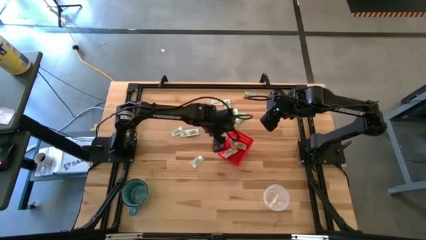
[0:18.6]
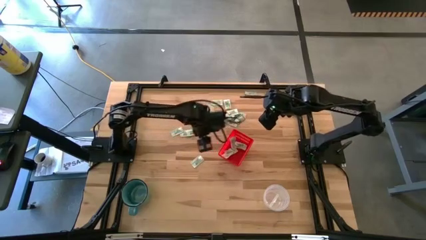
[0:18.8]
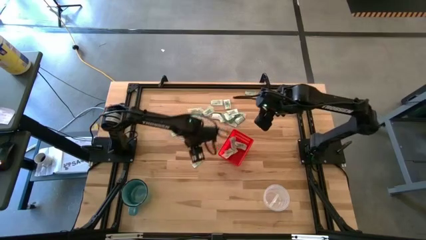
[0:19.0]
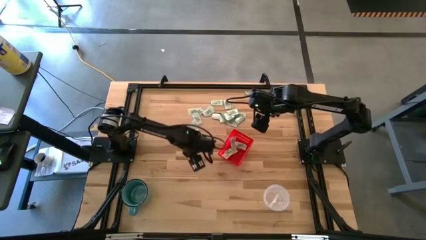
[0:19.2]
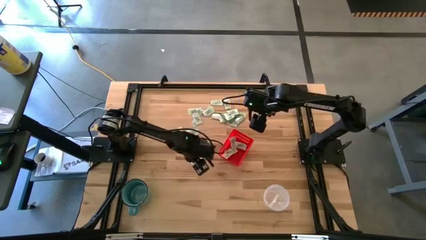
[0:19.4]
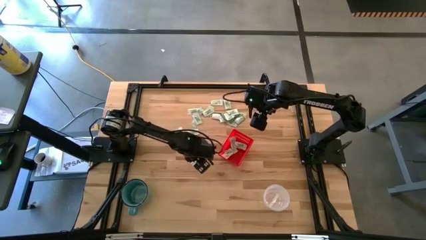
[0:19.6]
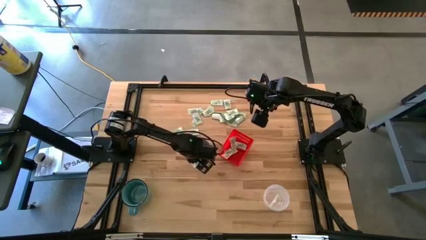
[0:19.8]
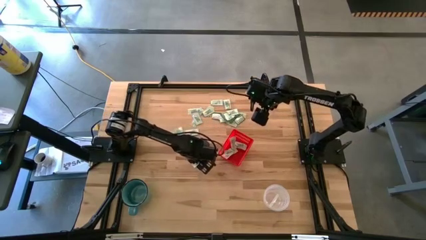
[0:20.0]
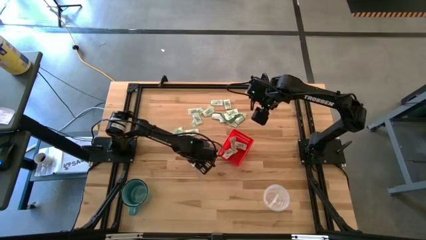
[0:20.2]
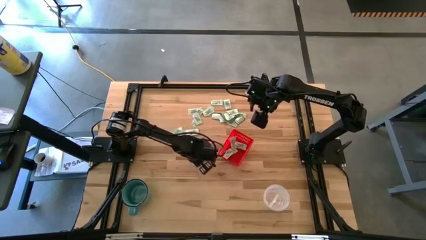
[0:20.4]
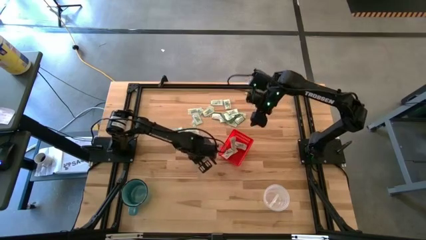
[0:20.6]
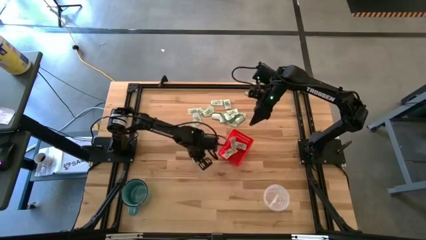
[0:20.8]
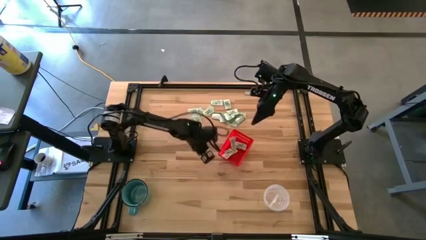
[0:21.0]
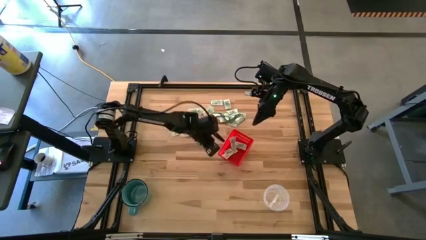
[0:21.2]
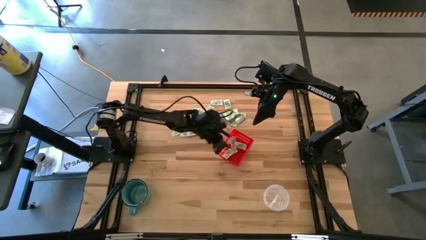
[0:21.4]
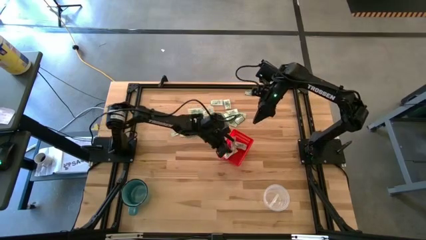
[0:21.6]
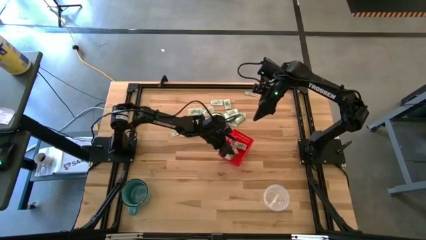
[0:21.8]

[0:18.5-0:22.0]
Task: Pick and place items into bin
Put the white stevia packet into the bin

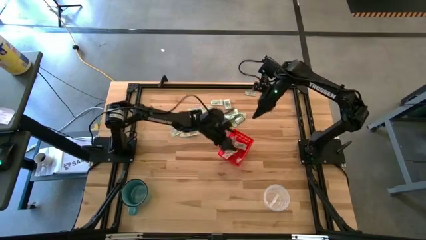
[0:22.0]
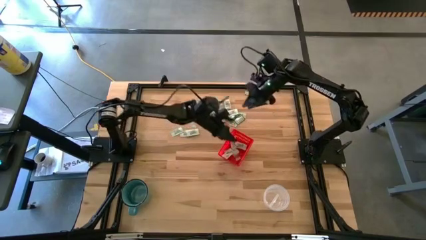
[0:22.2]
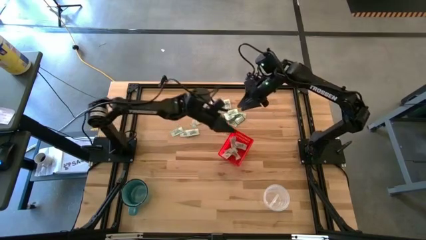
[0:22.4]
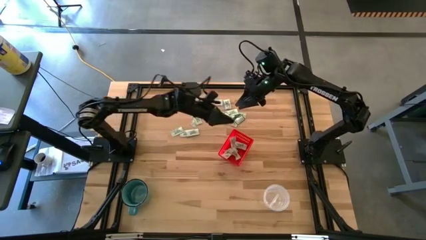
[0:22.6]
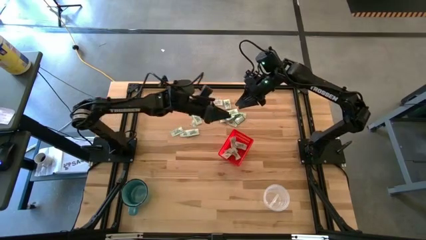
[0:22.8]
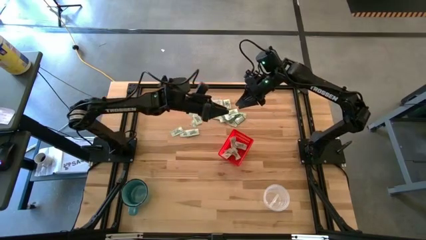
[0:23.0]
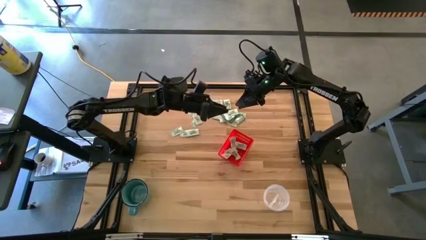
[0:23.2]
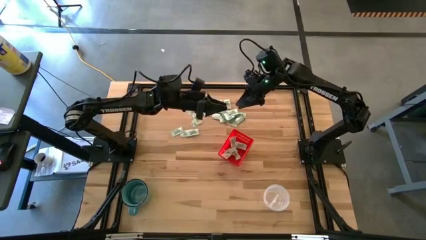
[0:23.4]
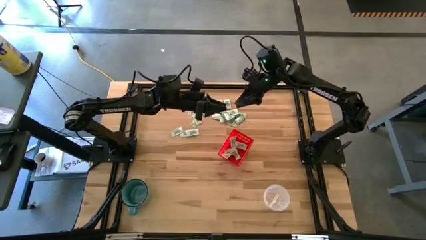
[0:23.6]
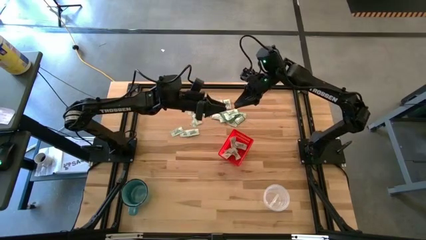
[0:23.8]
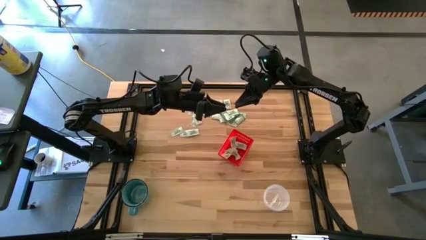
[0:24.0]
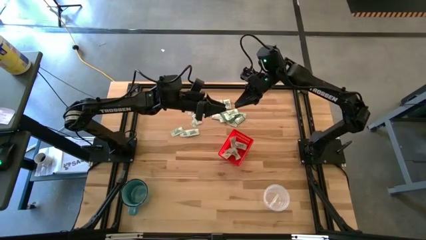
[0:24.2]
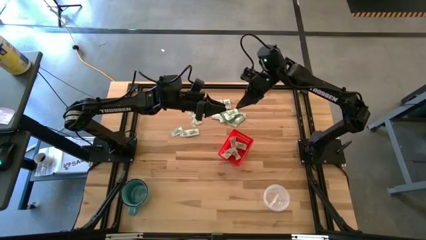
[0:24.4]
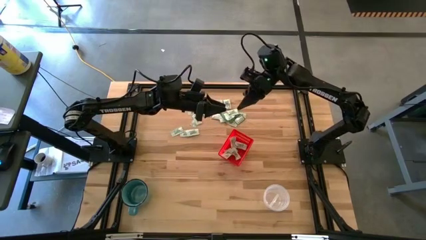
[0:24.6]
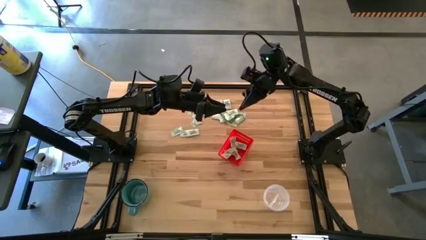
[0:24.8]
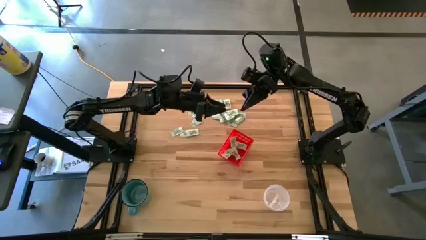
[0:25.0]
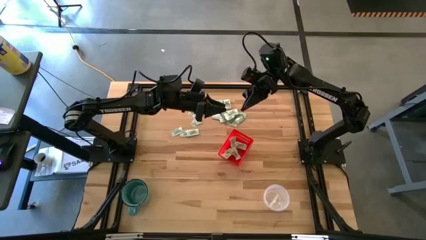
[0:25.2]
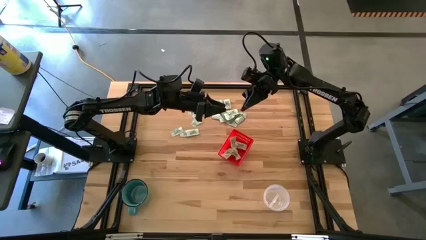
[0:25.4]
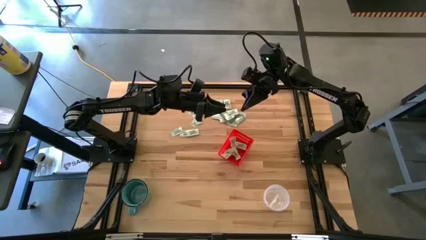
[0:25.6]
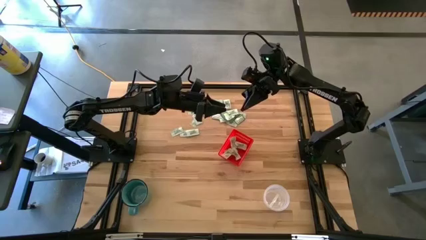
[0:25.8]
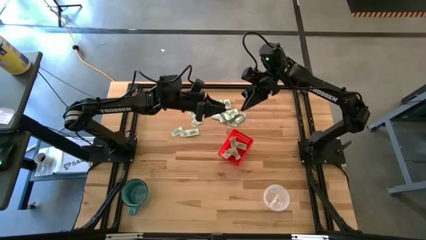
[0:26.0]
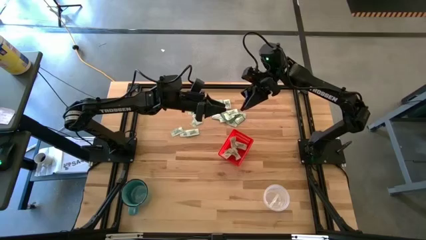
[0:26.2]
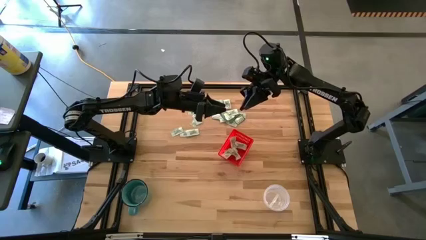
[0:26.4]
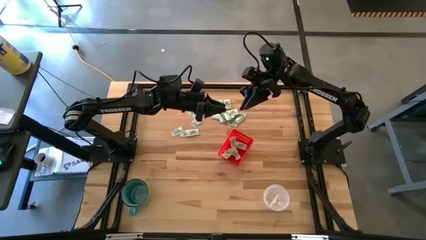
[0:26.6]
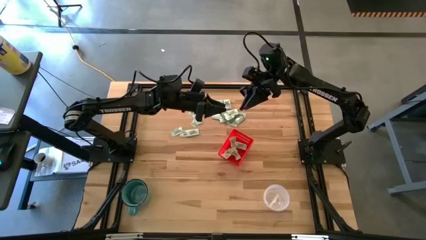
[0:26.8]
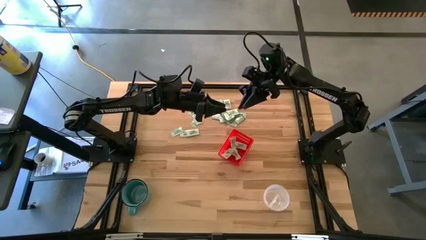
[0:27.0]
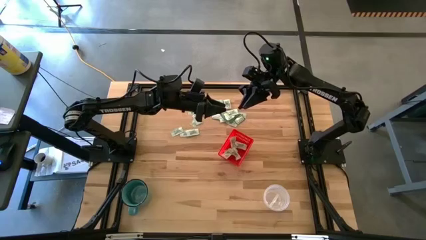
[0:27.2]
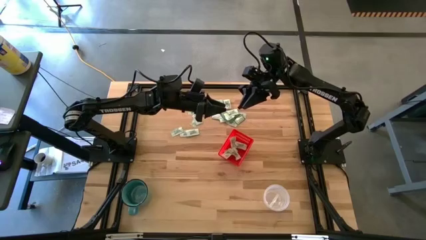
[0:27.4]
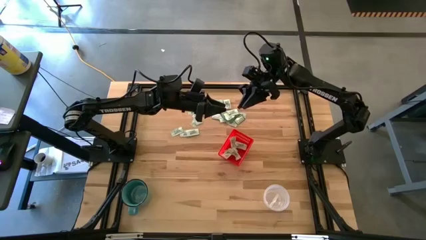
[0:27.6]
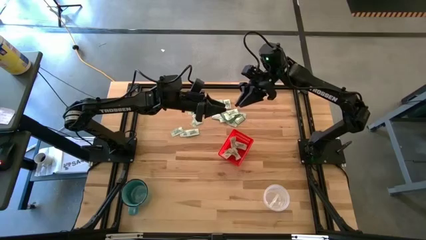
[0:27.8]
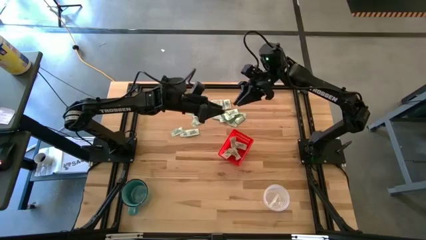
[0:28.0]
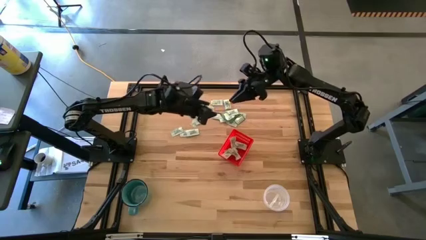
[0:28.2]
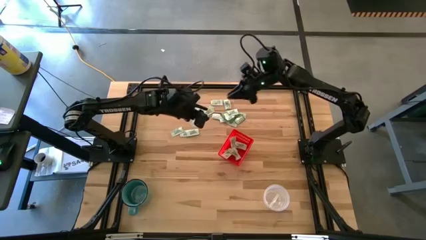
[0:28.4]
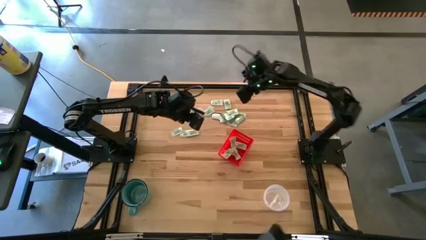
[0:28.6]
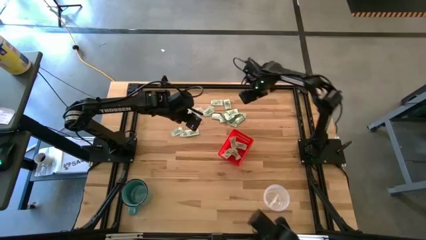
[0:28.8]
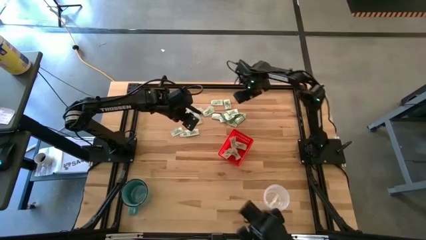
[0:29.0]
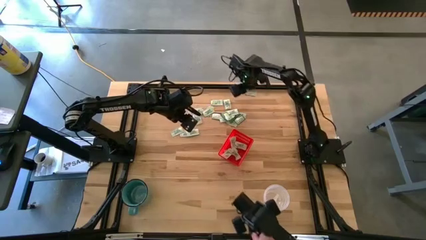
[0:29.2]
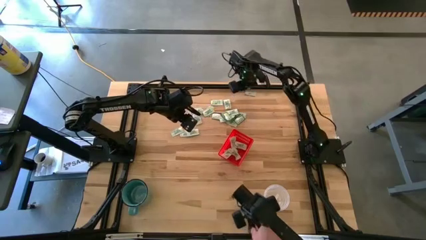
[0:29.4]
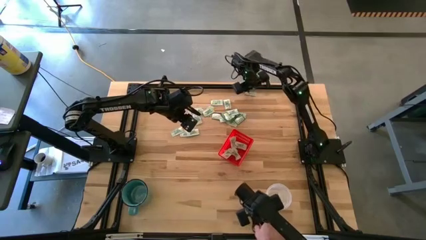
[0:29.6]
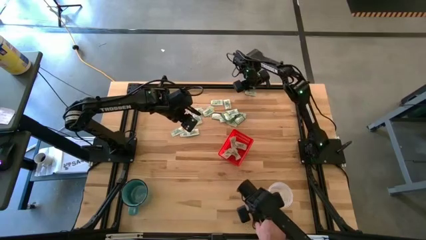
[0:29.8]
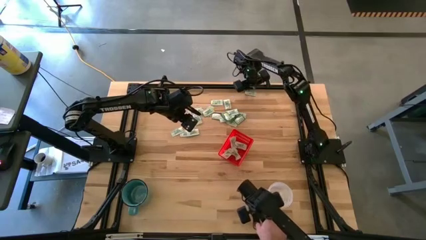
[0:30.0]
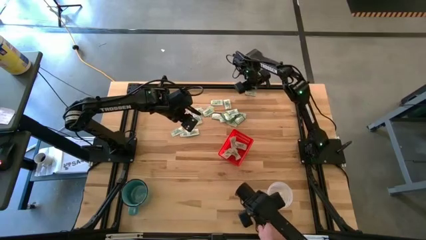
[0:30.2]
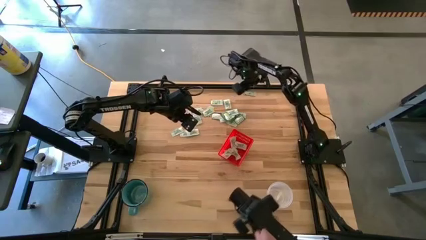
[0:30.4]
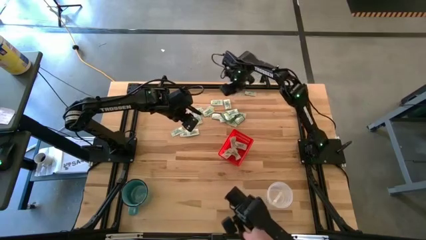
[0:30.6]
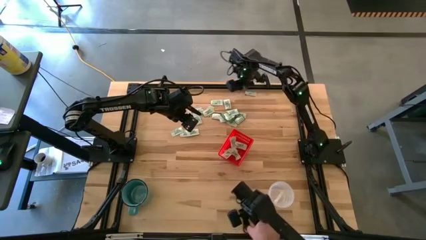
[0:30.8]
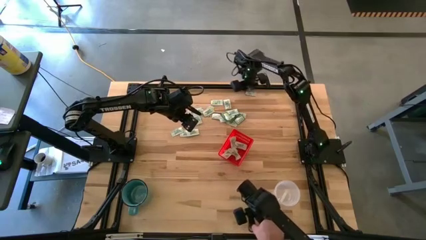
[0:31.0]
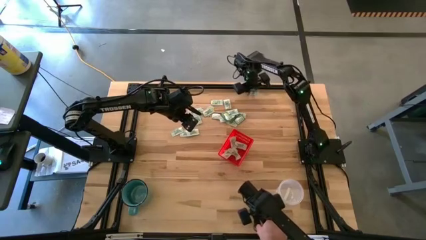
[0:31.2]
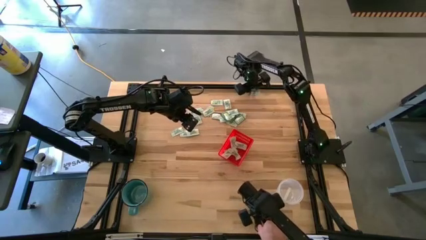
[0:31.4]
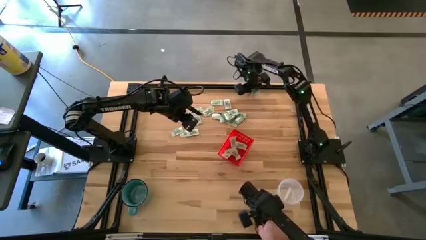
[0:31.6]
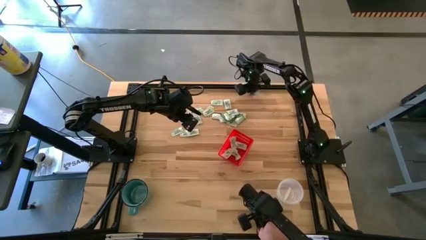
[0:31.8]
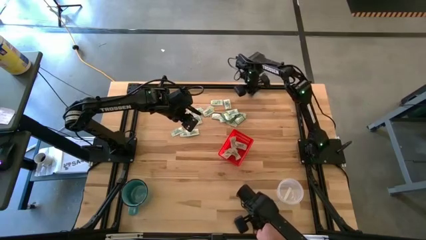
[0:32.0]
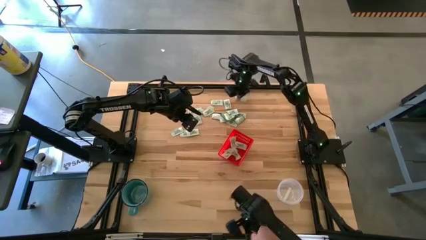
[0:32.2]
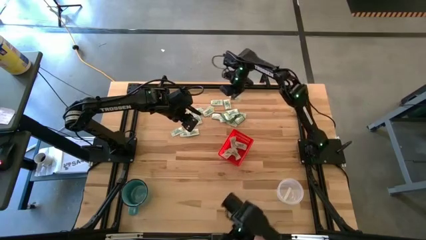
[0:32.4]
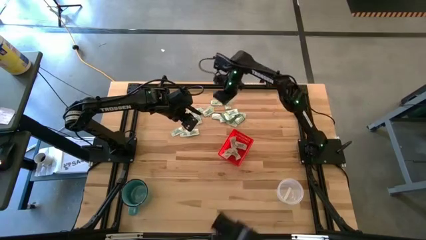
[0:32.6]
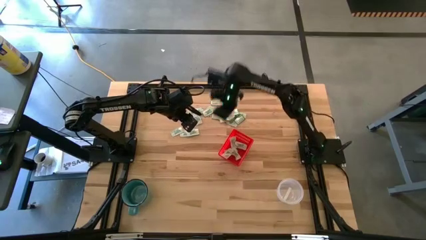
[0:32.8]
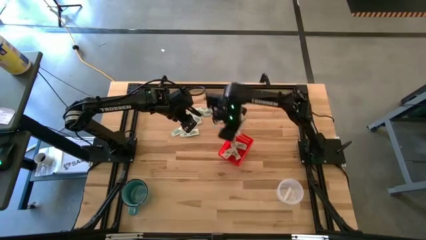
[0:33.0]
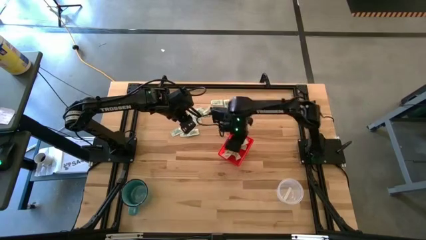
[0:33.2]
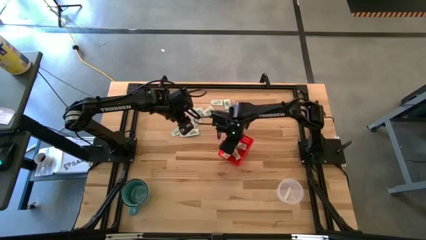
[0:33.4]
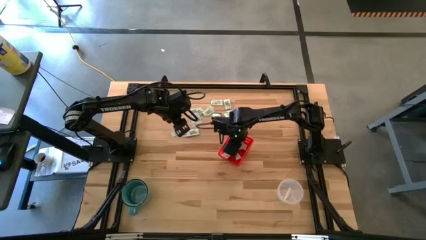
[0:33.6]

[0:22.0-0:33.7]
Put the white stevia packet into the bin

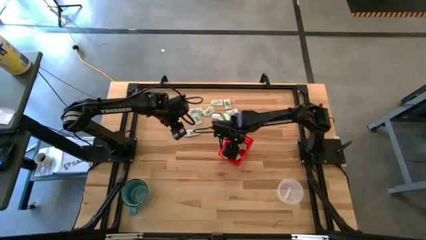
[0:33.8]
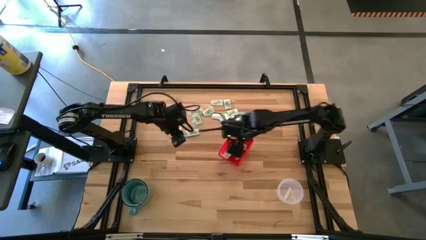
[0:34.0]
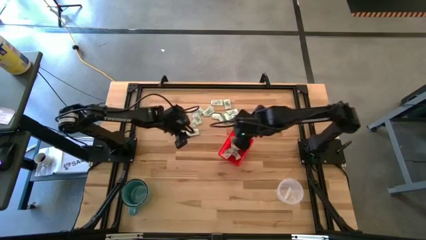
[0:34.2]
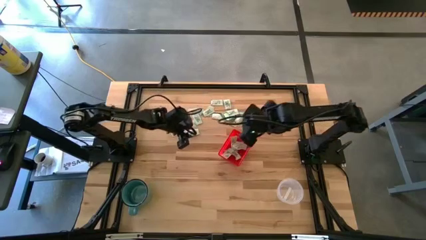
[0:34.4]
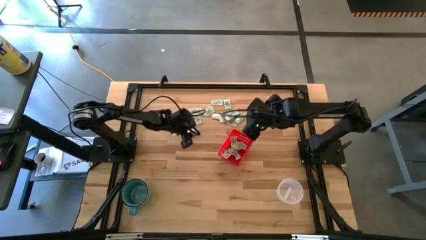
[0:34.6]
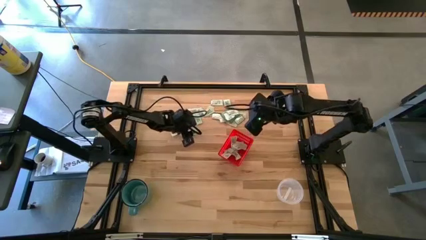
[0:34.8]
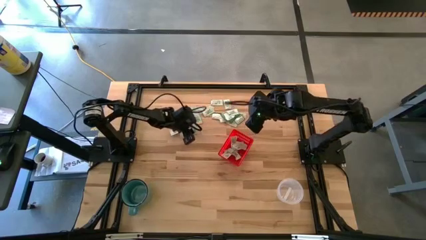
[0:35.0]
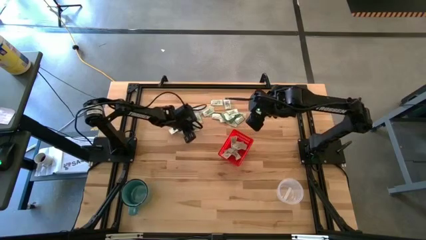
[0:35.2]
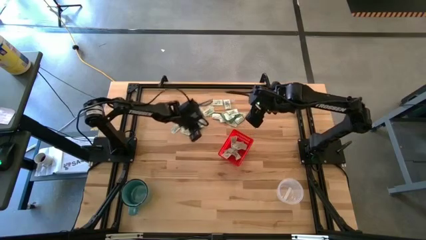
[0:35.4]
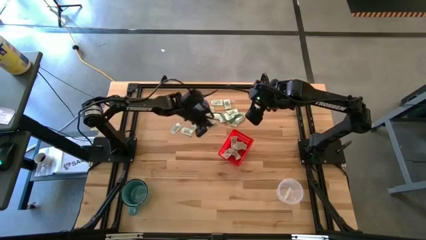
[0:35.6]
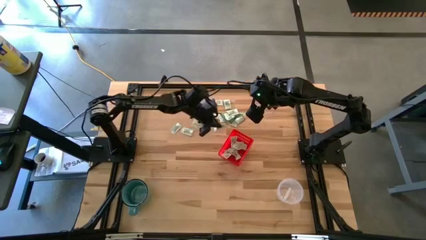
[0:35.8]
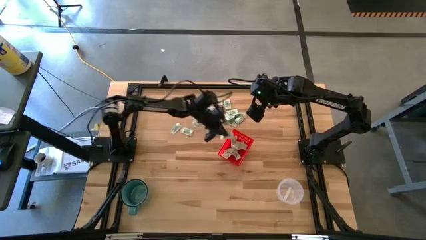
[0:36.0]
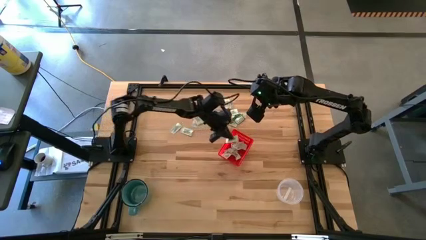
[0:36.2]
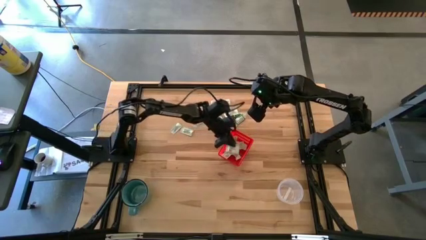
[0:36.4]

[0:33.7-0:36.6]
Put the white stevia packet into the bin
